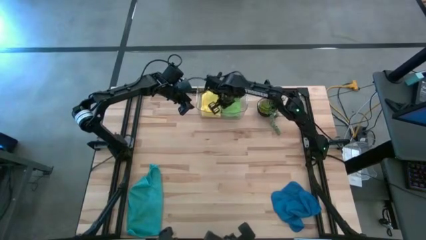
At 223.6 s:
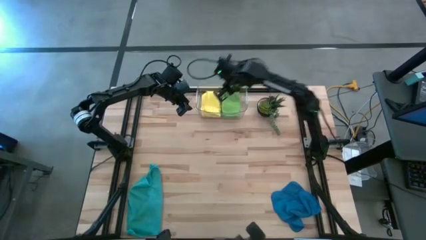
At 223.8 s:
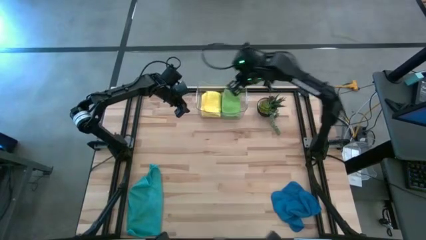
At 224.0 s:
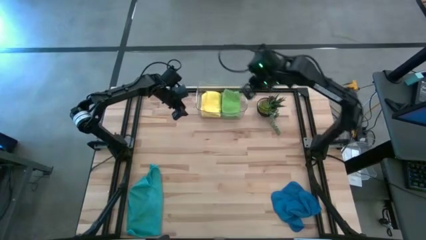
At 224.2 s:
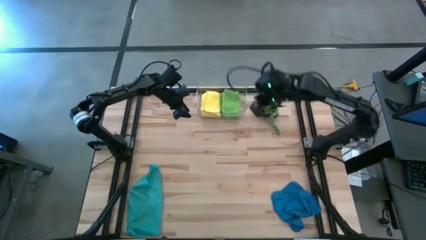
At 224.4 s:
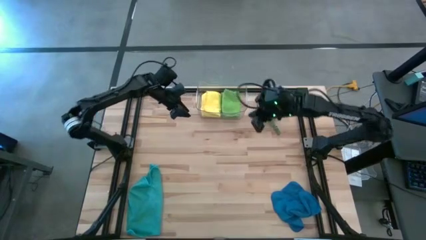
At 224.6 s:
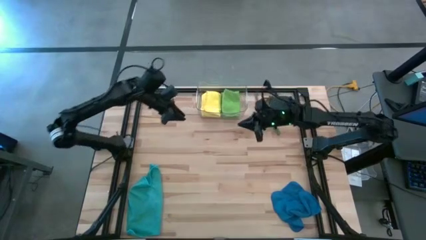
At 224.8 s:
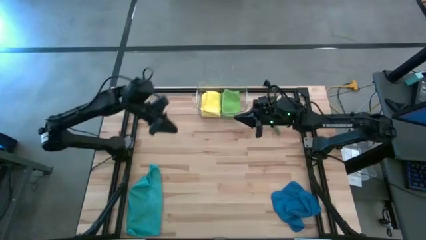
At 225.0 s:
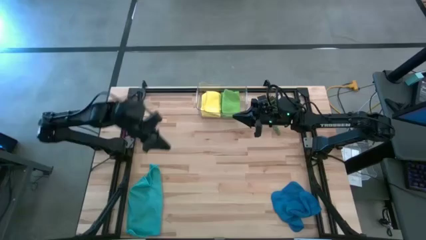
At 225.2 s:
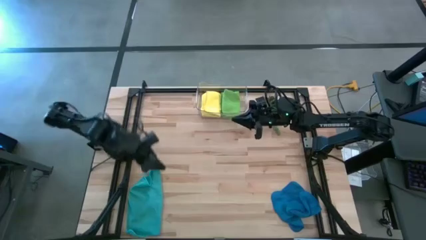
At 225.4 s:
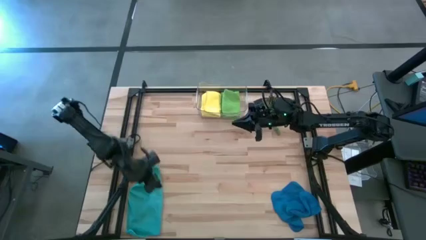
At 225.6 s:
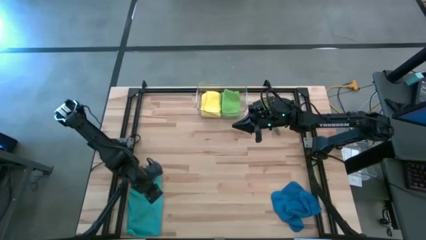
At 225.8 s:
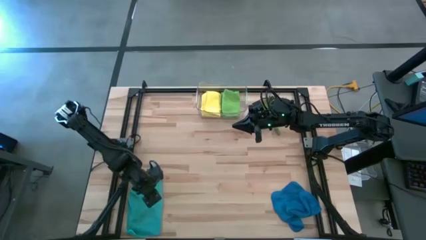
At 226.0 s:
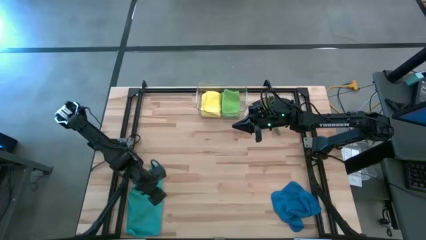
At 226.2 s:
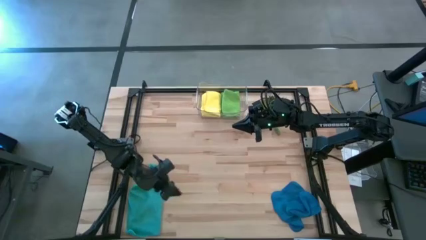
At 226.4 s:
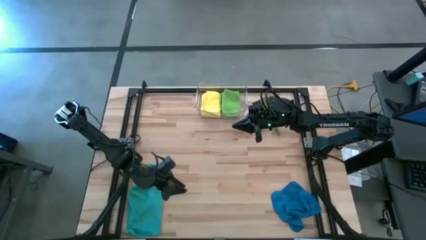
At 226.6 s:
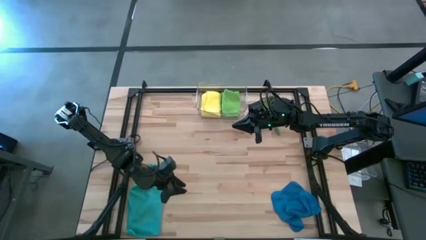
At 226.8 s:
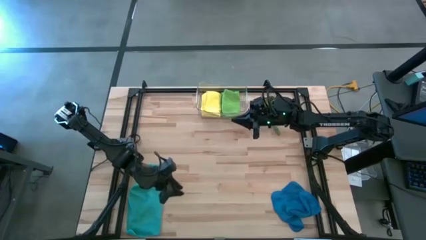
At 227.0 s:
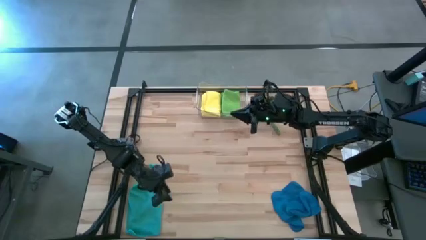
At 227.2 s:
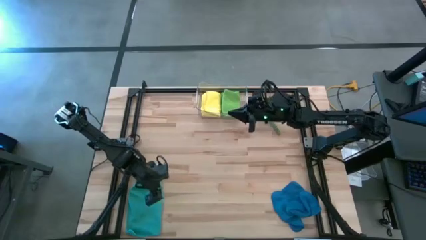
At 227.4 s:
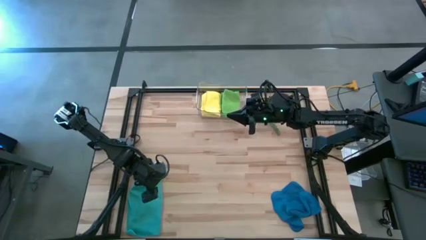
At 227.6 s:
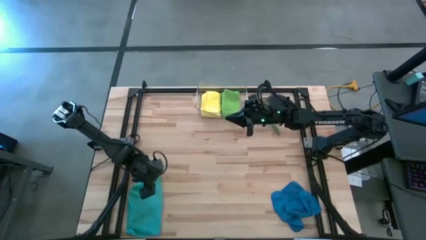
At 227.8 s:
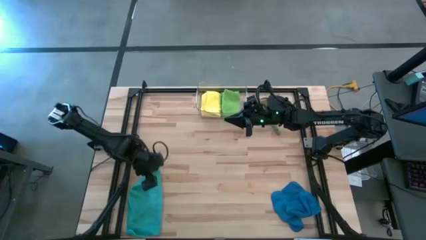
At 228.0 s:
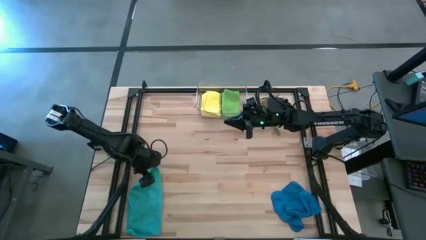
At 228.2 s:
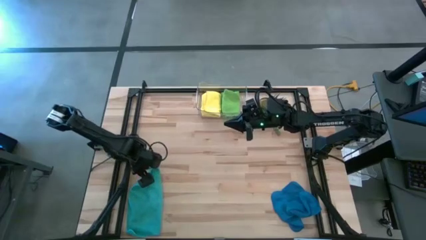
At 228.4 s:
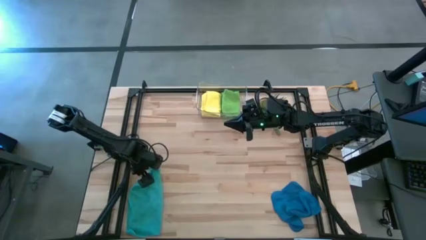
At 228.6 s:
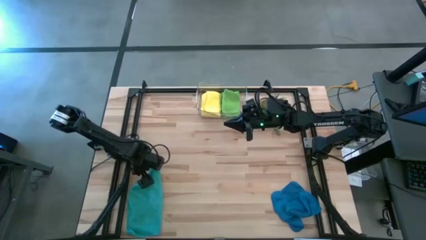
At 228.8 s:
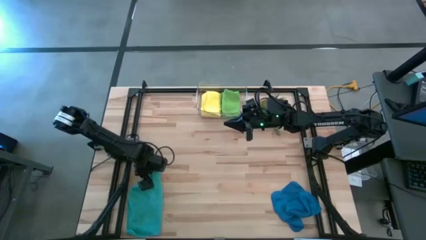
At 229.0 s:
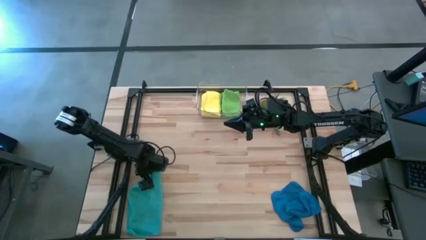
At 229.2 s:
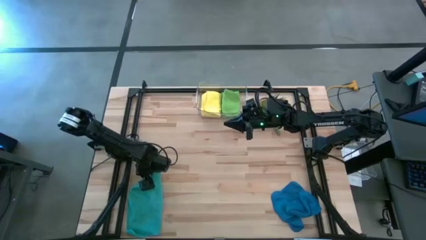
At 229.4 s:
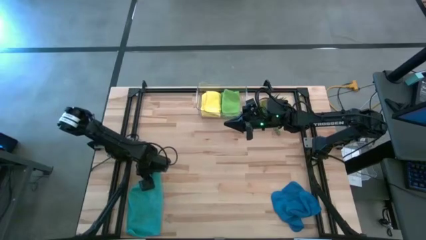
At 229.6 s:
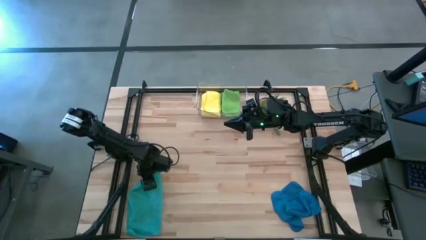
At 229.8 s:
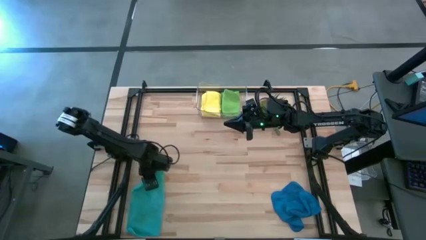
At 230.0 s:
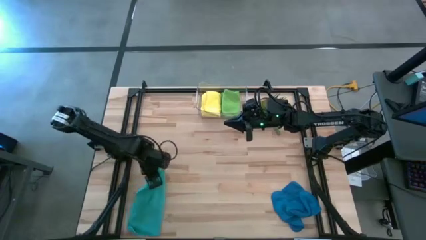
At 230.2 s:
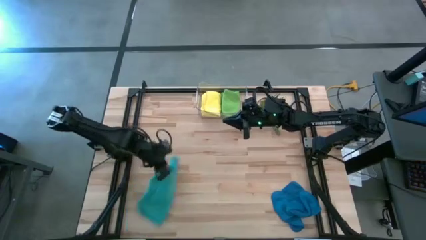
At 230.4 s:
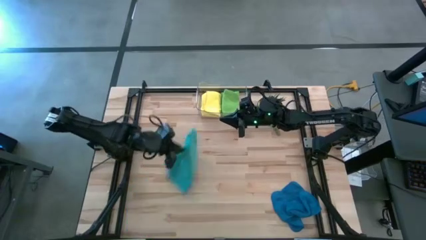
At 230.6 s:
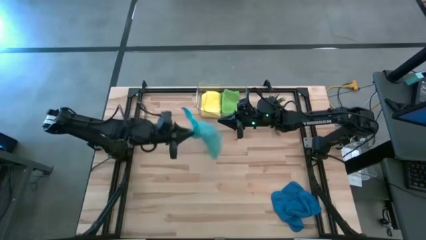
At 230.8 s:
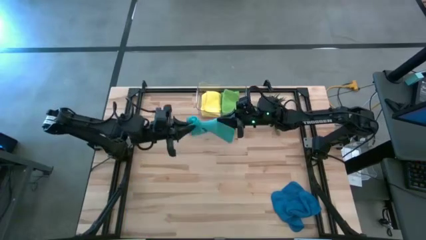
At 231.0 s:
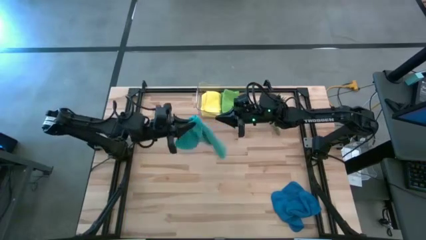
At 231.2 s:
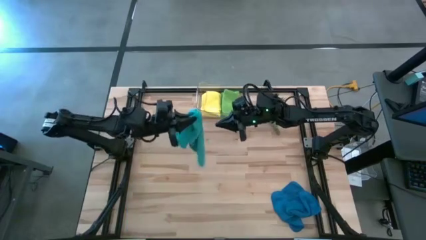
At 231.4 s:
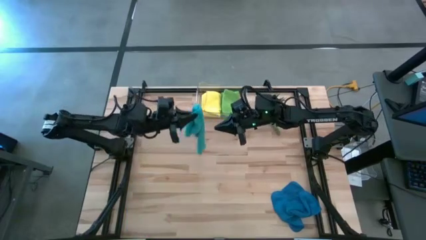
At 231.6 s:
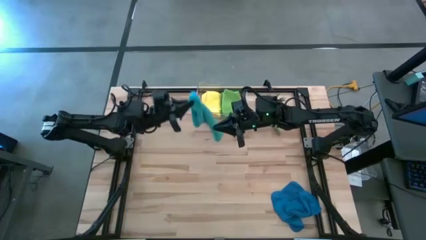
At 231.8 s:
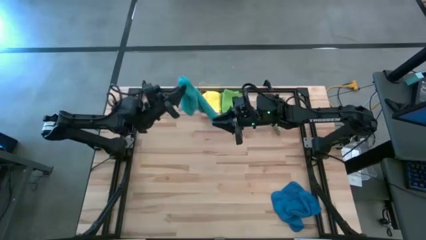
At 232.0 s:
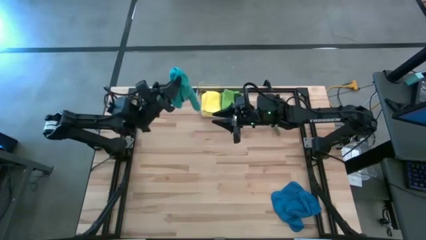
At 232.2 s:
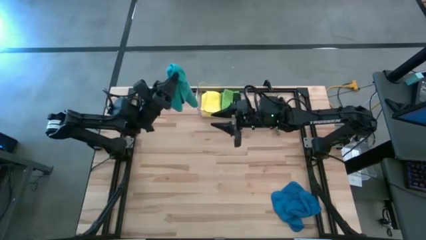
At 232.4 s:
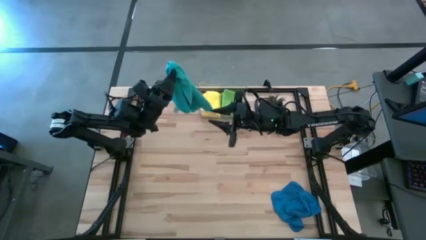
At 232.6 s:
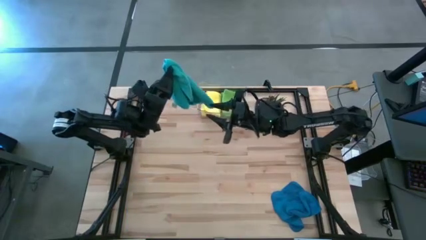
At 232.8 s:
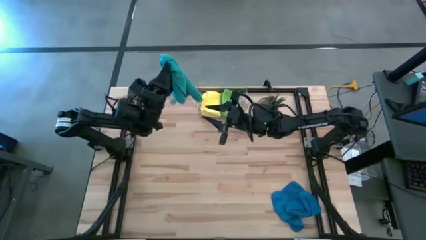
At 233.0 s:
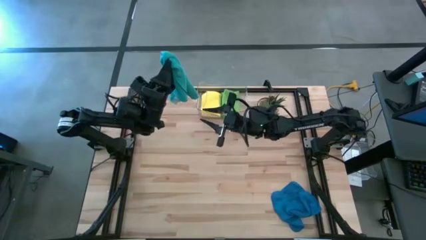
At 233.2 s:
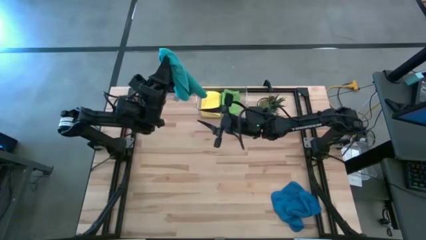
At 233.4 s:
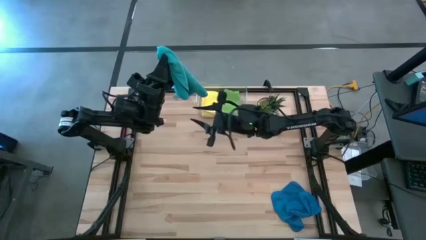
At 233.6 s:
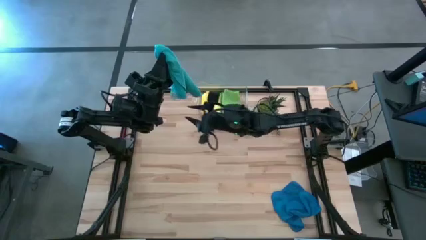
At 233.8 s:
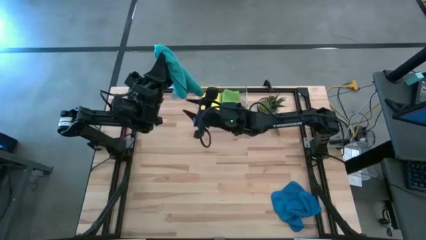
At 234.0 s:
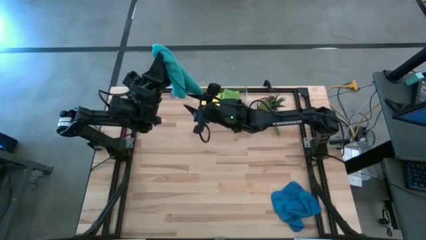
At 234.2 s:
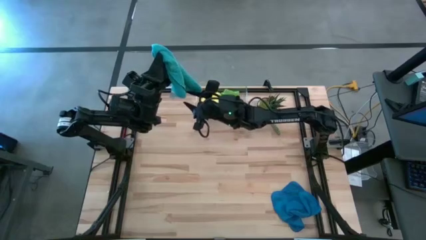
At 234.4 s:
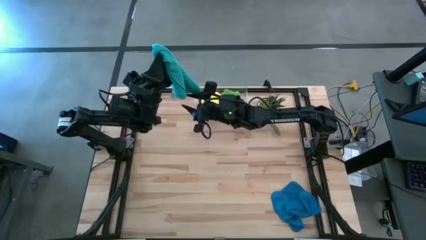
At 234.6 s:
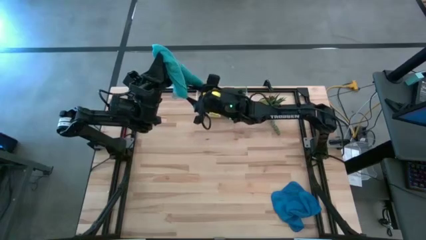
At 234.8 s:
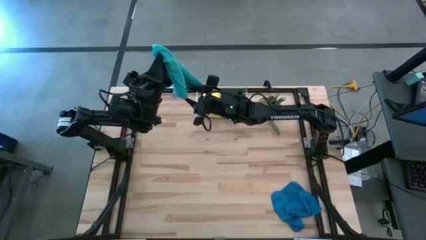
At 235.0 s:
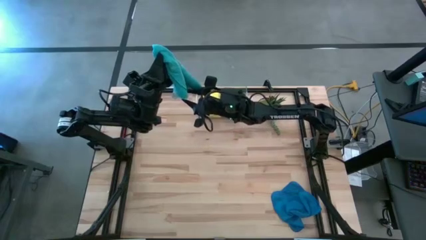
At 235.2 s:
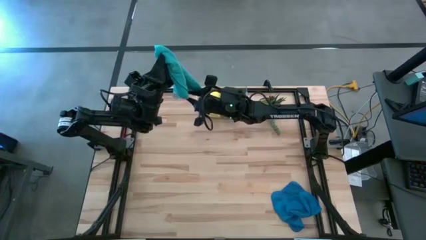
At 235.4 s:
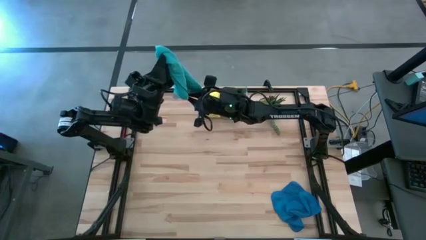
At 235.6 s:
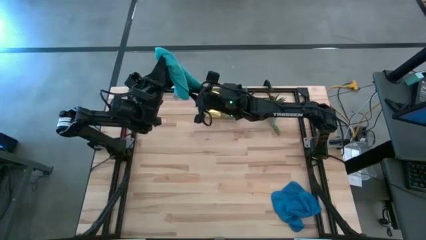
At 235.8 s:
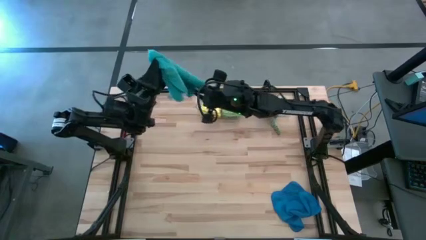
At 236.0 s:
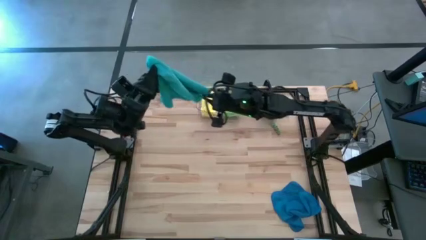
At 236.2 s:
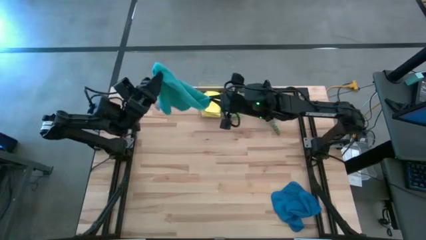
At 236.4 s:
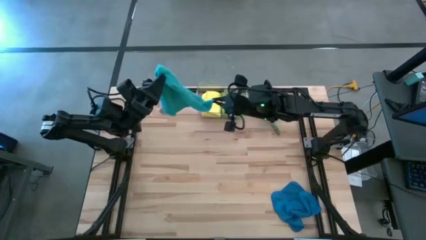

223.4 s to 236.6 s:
Task: Fold microfiber towels
Fold the light blue microfiber towel

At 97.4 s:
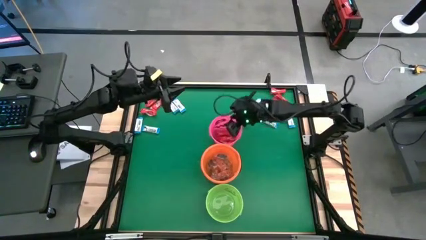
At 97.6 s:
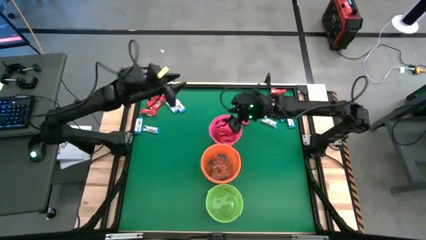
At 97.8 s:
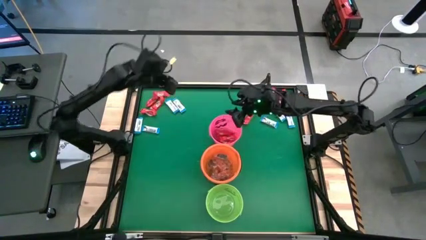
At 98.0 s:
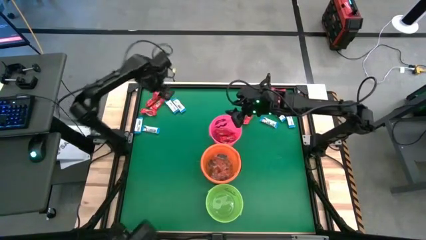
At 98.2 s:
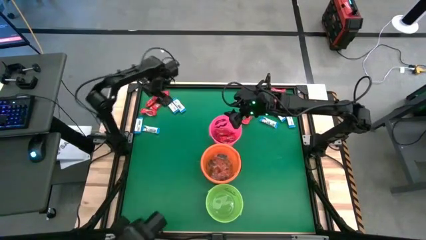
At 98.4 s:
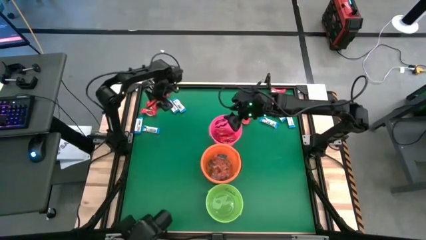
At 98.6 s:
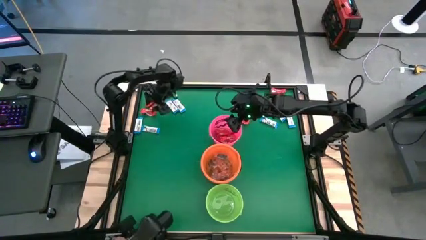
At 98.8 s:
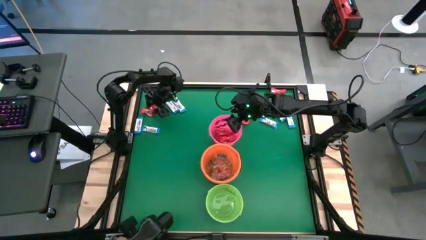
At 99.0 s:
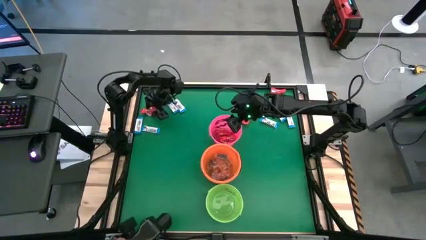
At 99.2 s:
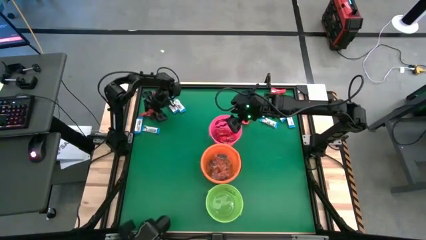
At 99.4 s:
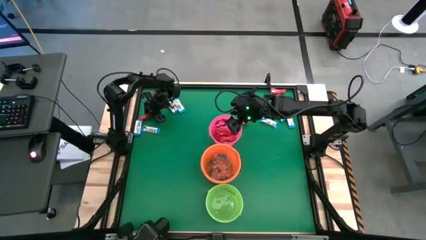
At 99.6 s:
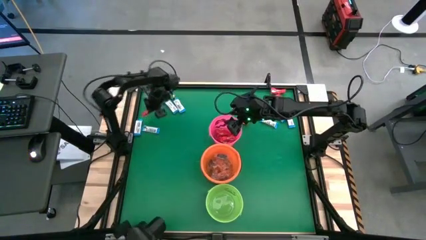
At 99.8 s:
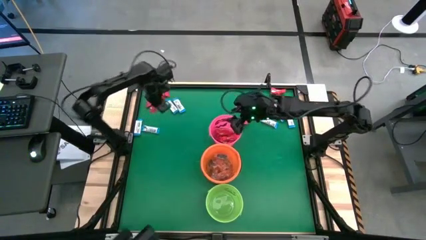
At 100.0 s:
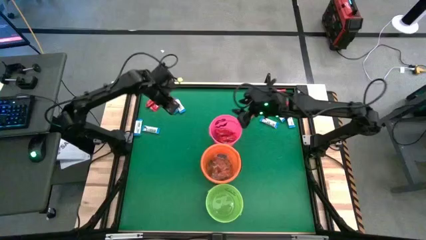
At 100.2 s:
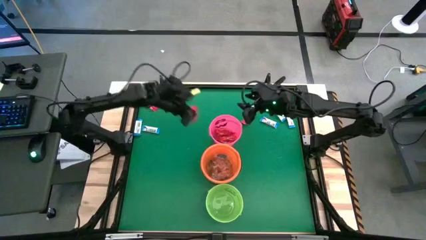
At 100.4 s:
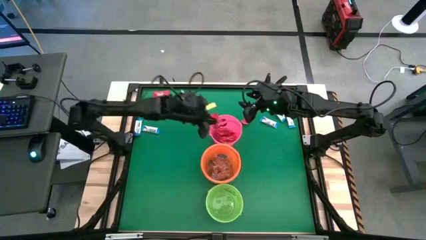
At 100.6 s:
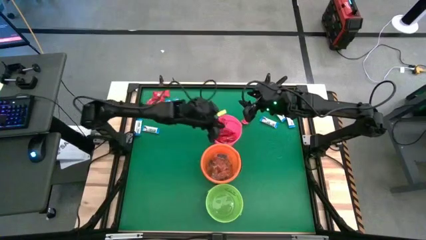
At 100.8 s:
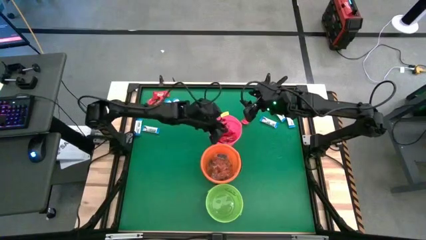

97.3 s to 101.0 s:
Task: Sort candy by brand, put in halloween buckets
Put the red chocolate into the pink bucket
